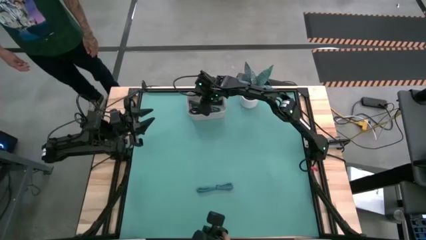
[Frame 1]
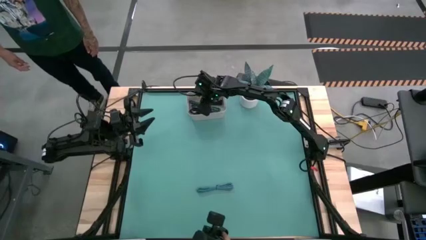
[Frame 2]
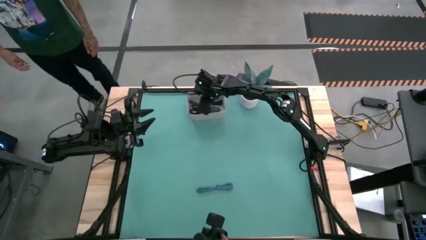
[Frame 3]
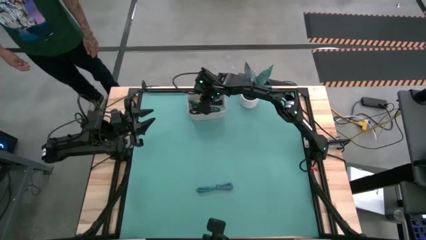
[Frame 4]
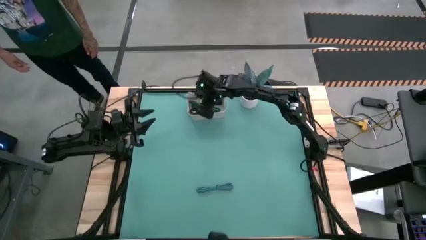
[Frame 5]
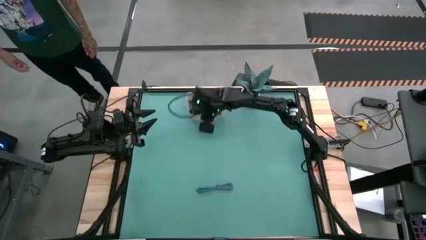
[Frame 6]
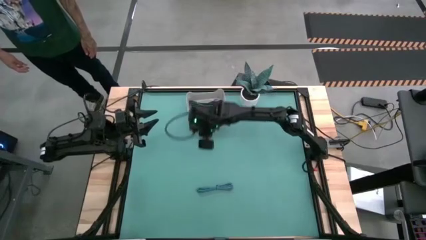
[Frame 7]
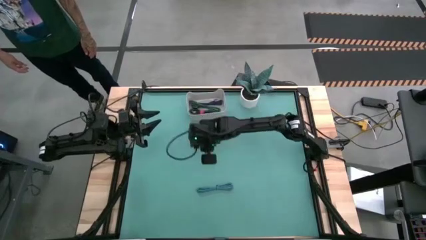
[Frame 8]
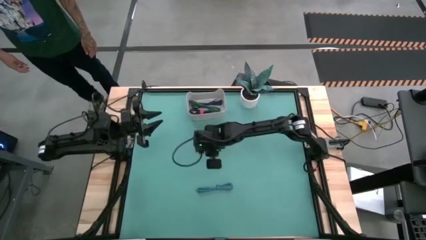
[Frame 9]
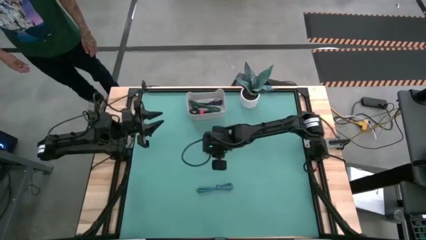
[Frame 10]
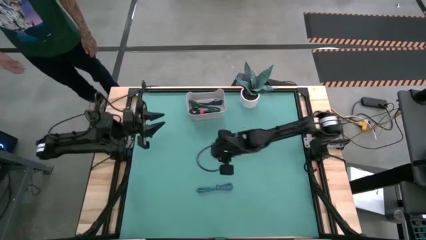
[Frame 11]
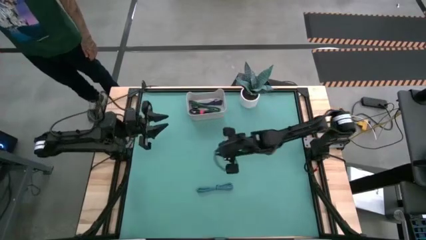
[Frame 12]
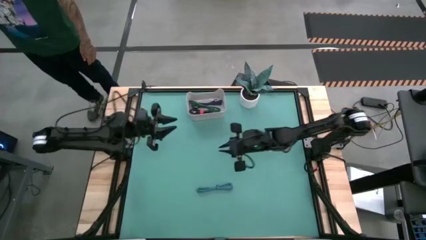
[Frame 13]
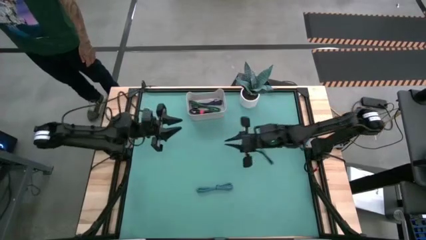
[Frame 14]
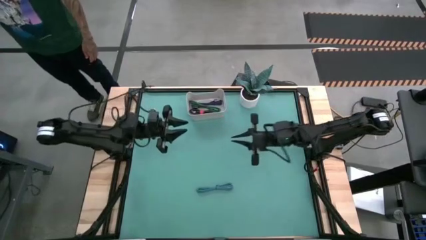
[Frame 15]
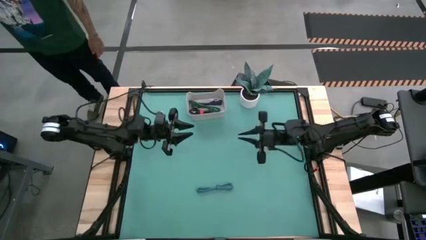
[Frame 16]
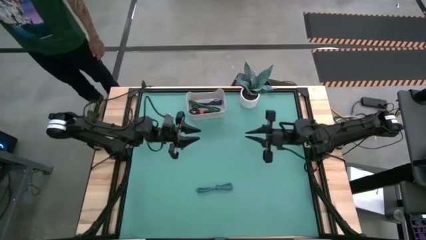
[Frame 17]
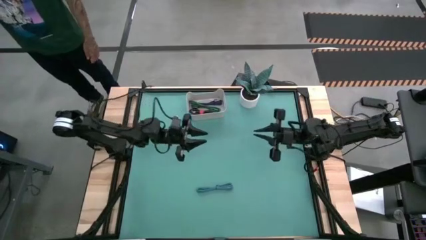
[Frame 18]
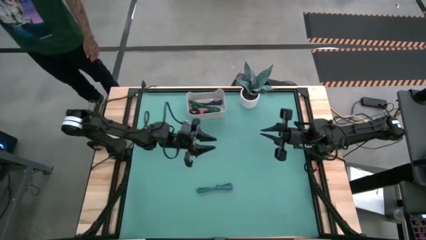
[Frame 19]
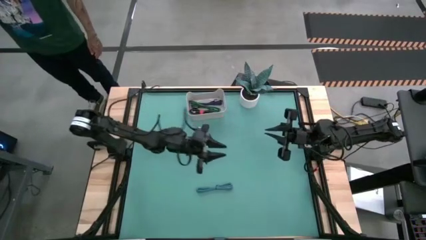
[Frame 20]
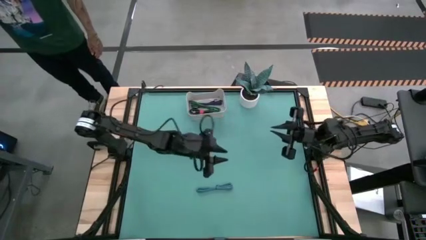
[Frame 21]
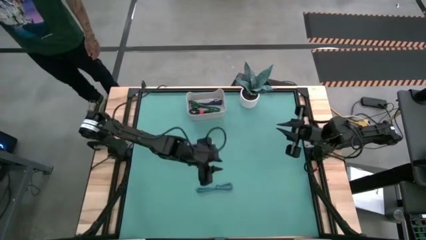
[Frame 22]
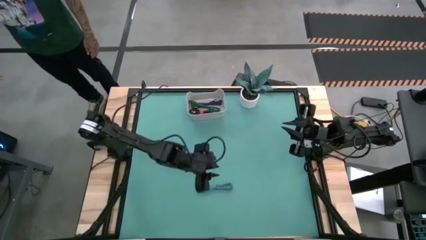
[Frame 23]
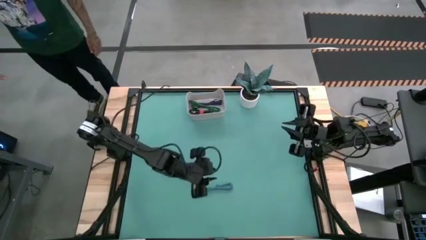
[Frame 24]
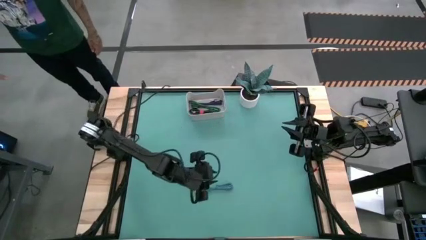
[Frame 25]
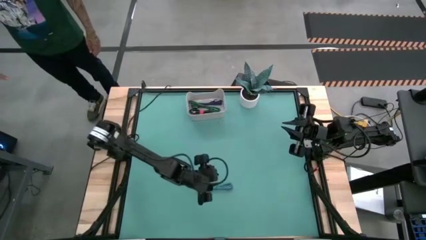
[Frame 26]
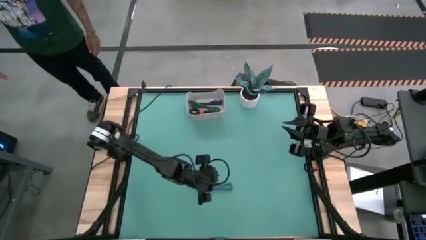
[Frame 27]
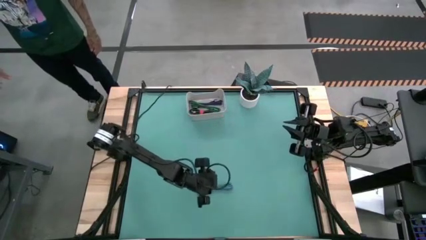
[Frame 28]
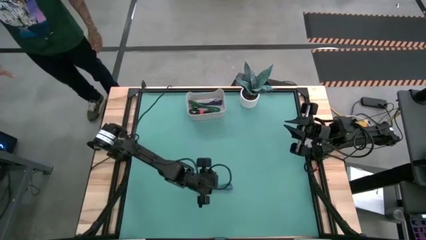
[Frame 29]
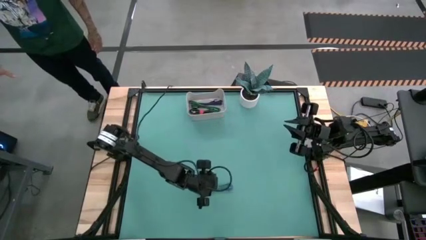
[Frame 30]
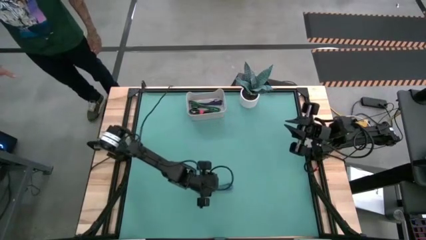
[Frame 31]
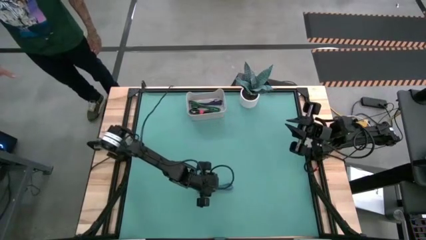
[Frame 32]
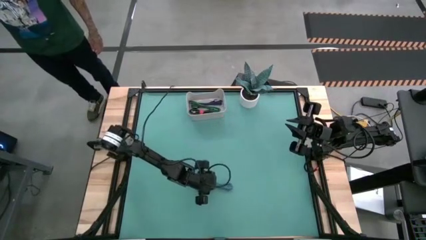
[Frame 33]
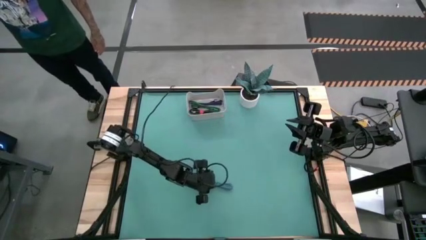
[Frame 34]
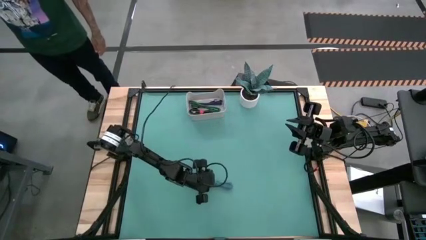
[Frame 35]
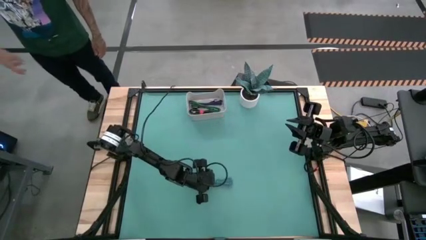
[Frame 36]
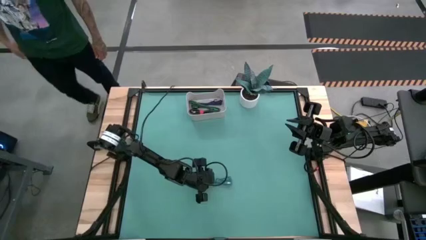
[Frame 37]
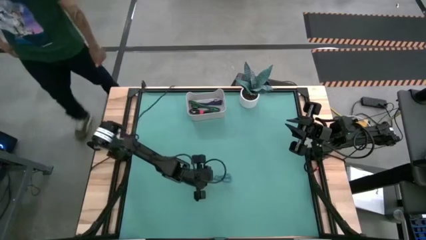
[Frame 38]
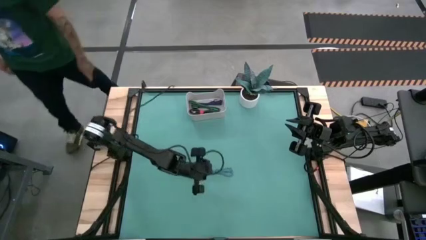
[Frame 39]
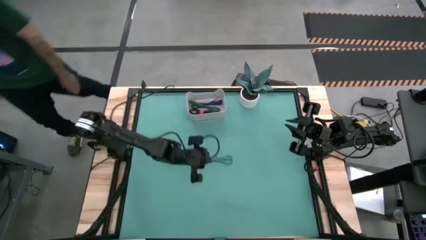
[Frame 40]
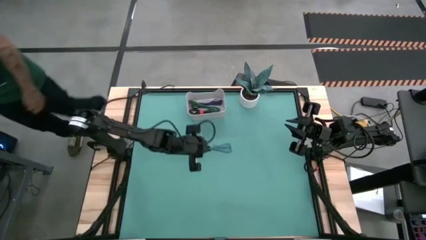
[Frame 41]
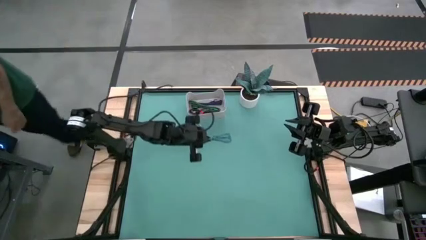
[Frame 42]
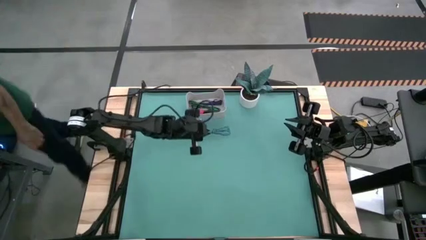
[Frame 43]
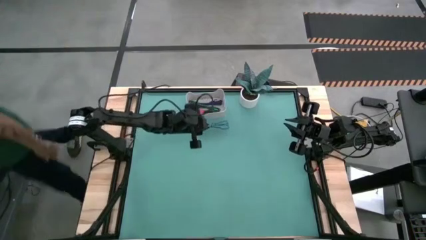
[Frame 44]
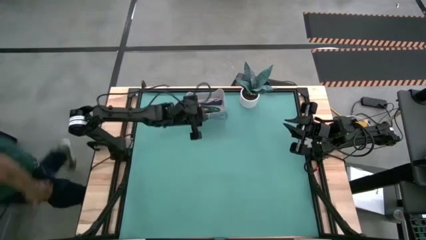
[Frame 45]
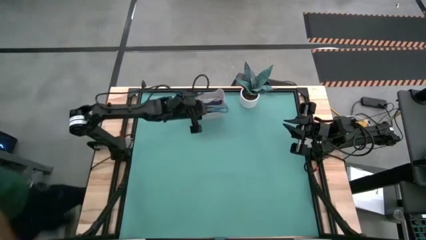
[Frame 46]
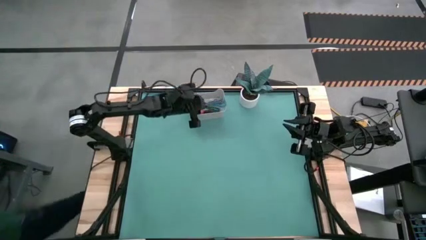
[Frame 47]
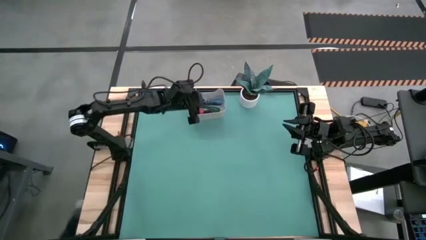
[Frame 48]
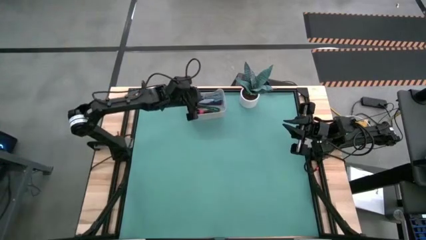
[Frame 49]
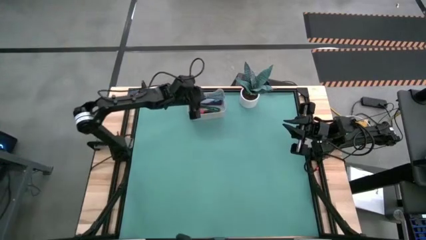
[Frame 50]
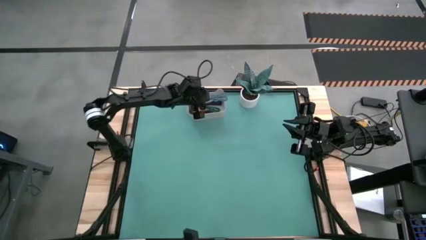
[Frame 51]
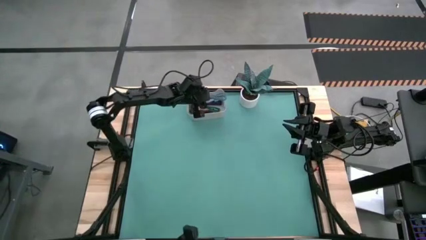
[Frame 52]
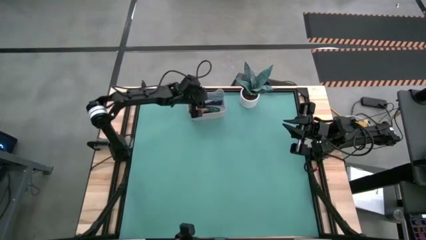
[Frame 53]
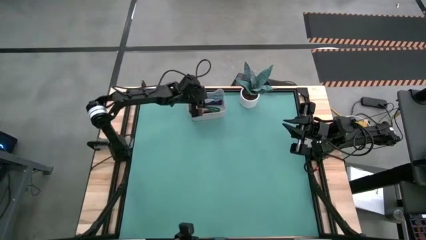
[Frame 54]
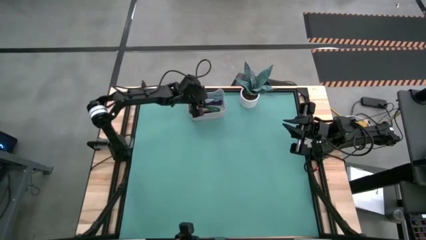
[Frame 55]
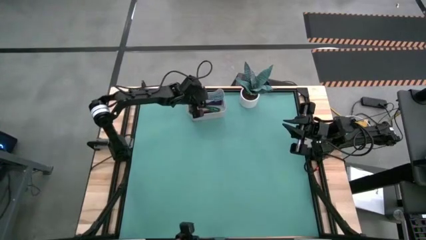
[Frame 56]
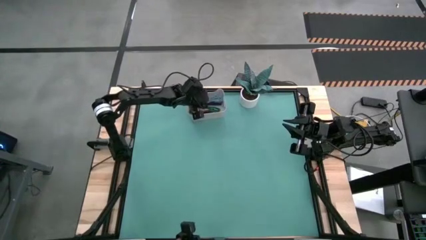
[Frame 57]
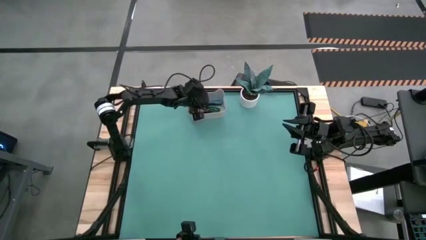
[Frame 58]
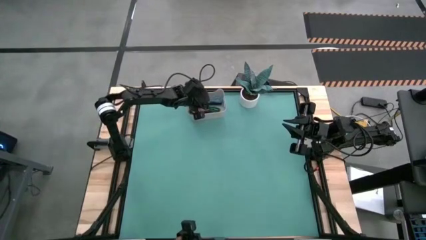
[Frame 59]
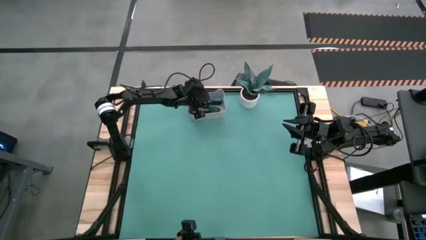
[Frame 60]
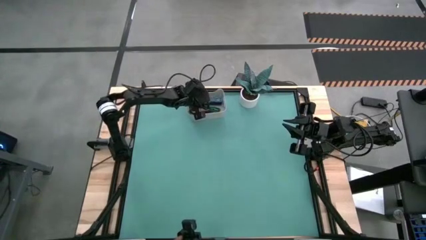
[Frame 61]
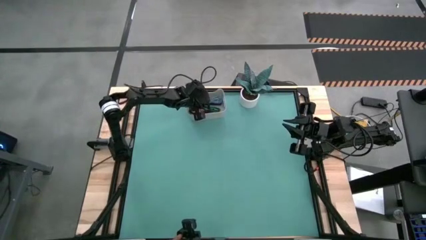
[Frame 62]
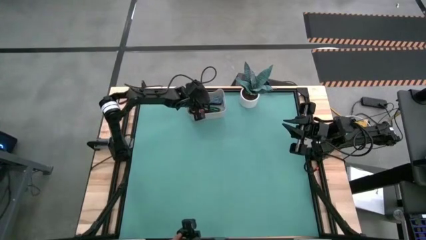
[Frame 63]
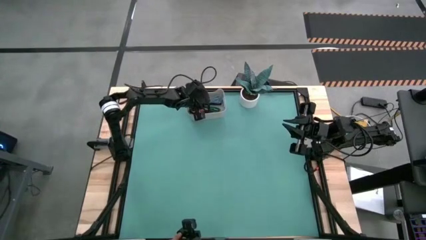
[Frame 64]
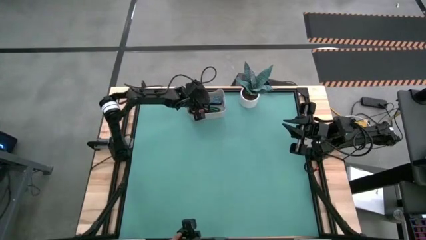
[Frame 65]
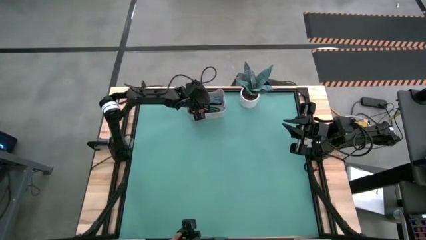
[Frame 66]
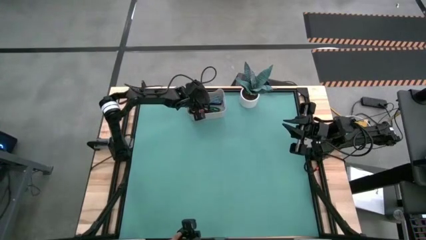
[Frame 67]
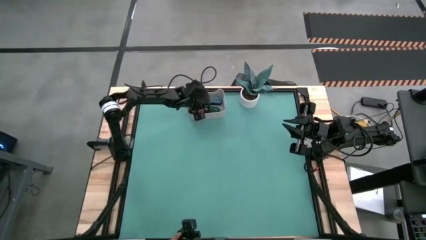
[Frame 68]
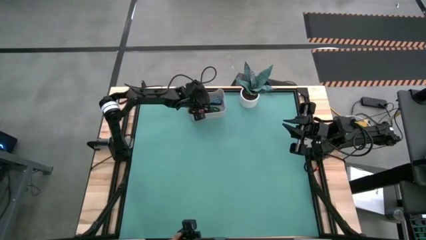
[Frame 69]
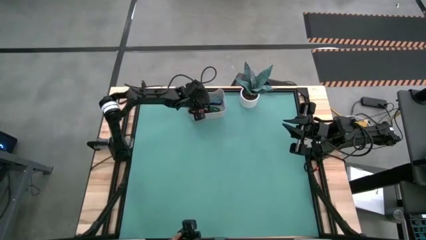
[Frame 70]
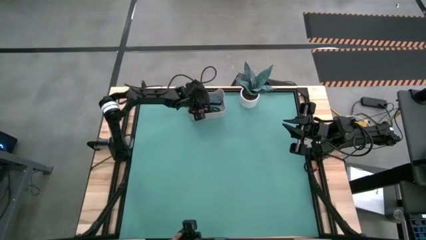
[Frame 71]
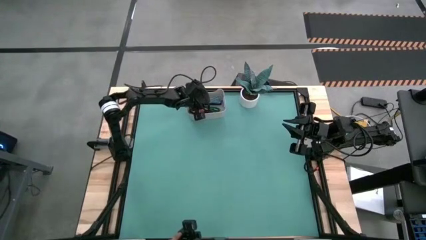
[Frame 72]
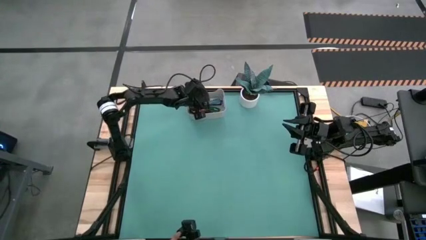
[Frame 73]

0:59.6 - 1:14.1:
Task: Pick and place USB-C Cables
Put the blue charger cable into the white bin

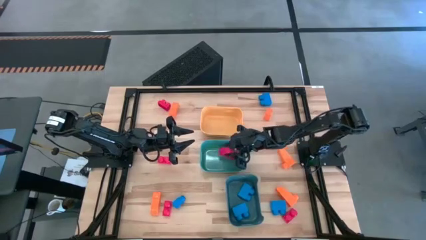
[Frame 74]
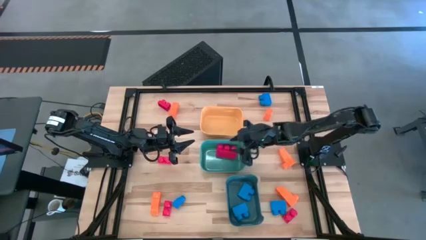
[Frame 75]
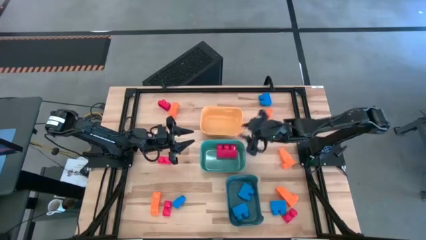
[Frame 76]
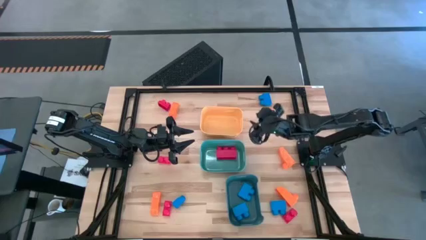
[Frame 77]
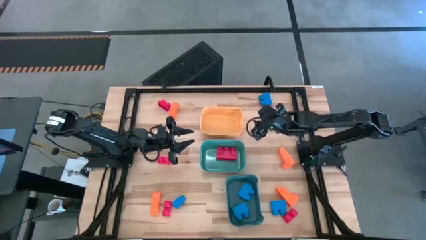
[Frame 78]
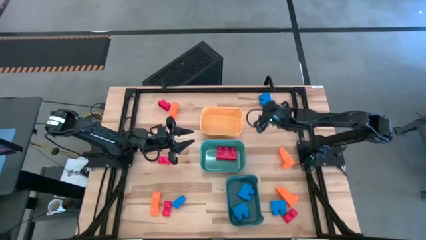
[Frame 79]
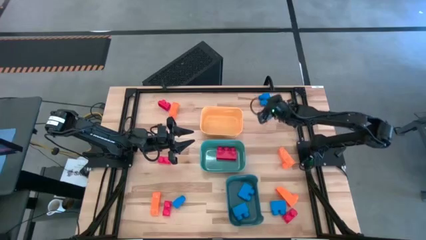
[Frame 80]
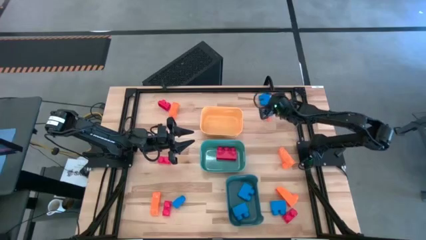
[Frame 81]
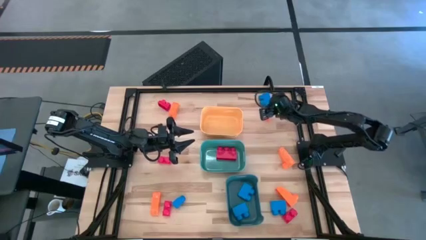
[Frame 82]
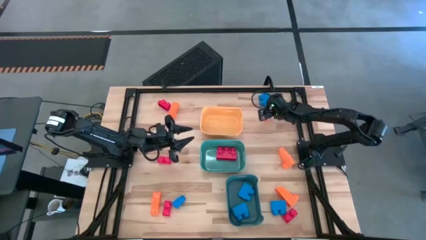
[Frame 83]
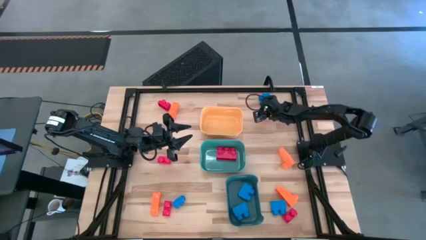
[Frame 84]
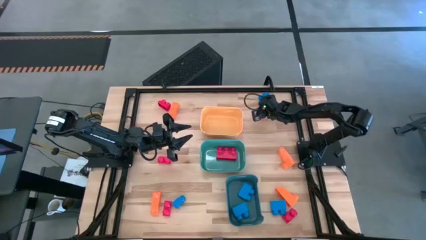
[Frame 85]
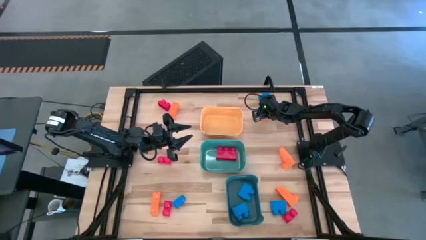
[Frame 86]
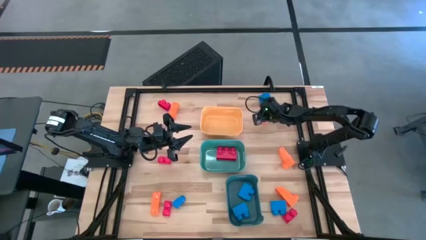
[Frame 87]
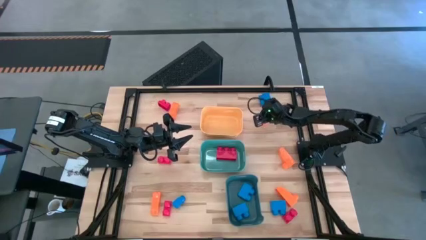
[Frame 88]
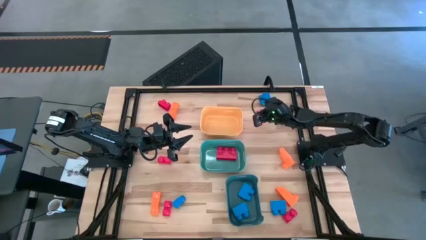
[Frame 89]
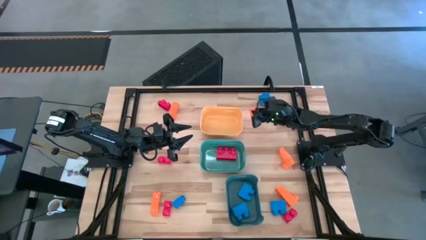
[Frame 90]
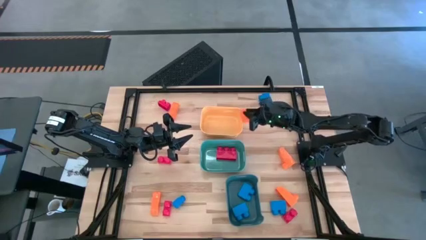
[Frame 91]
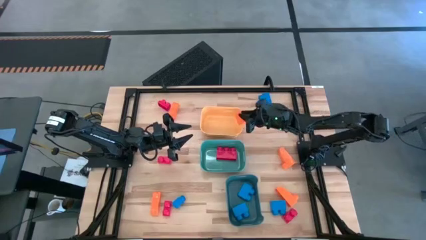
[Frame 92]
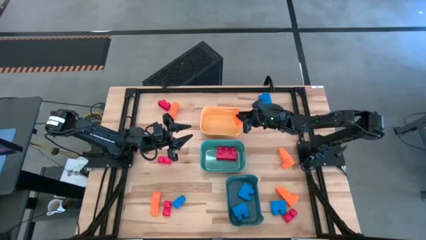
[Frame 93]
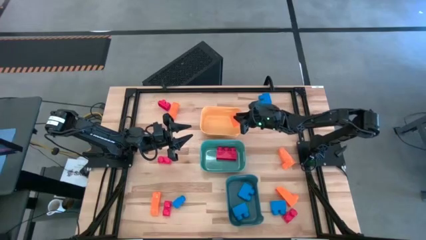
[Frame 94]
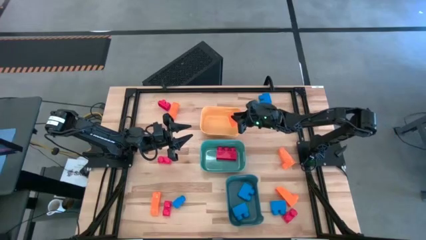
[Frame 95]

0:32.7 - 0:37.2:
Task: Sort & place blocks by color
Put the orange game piece into the orange bin
